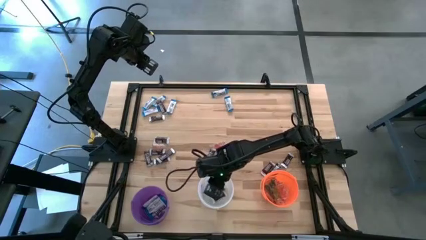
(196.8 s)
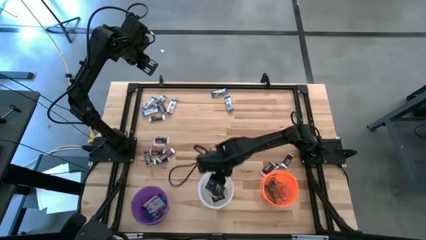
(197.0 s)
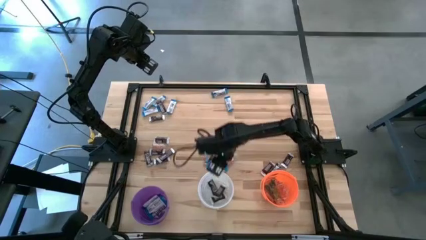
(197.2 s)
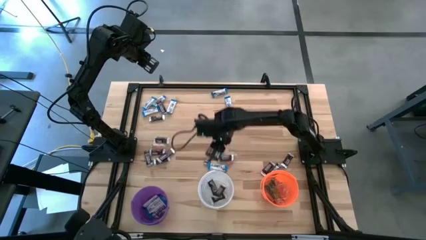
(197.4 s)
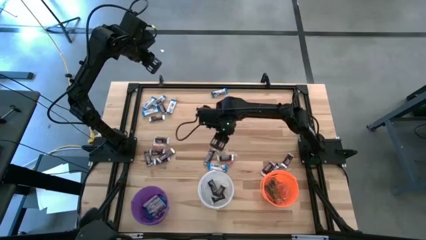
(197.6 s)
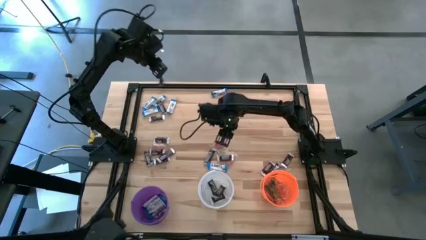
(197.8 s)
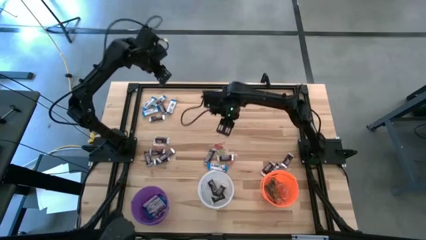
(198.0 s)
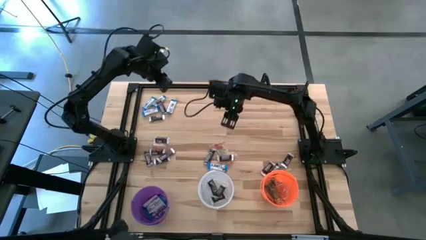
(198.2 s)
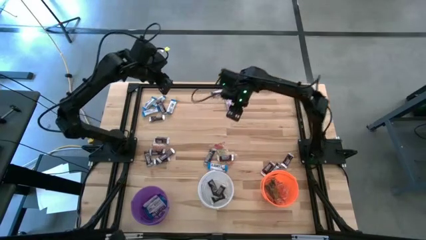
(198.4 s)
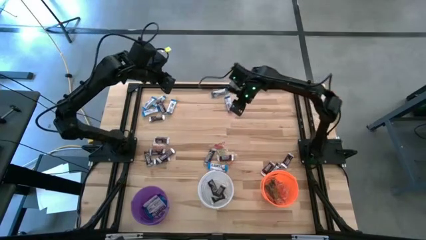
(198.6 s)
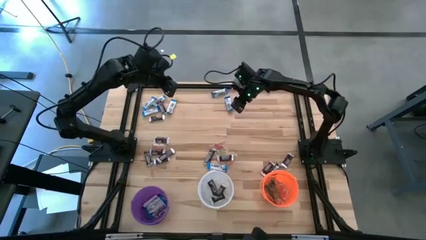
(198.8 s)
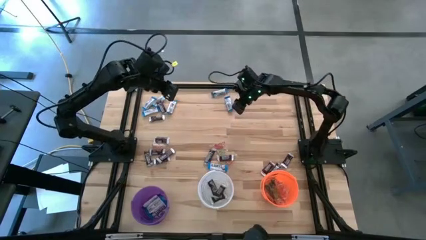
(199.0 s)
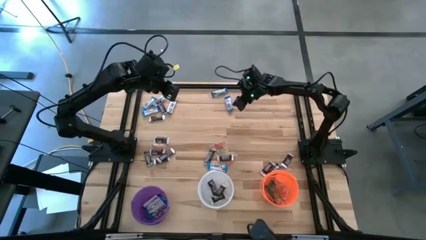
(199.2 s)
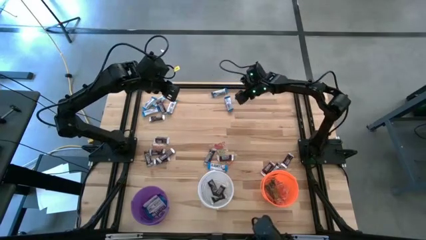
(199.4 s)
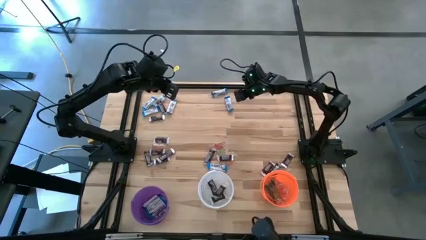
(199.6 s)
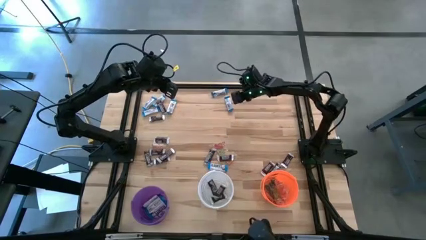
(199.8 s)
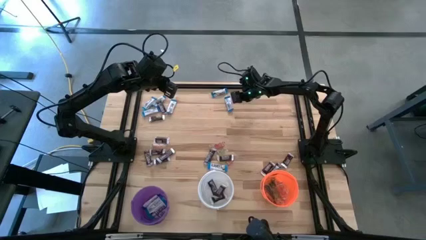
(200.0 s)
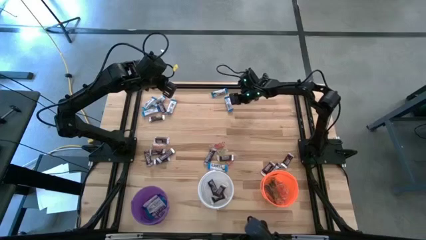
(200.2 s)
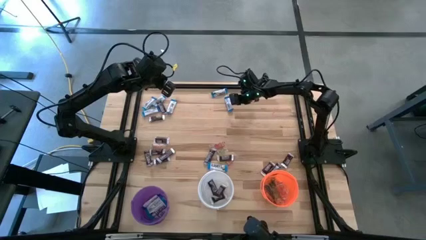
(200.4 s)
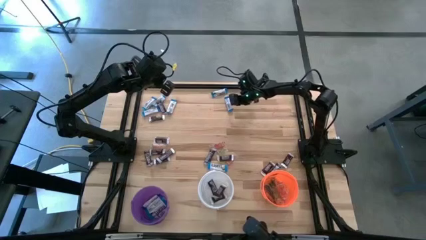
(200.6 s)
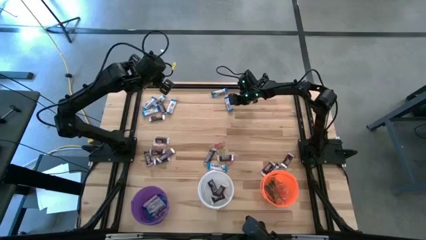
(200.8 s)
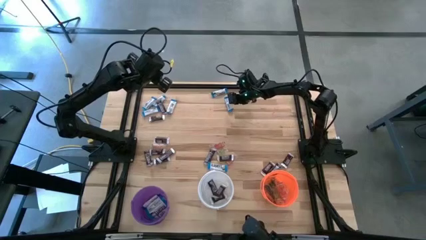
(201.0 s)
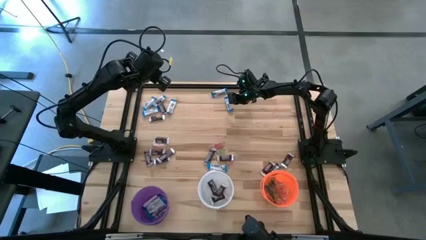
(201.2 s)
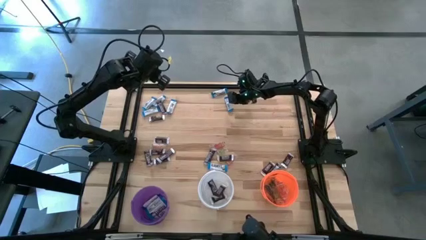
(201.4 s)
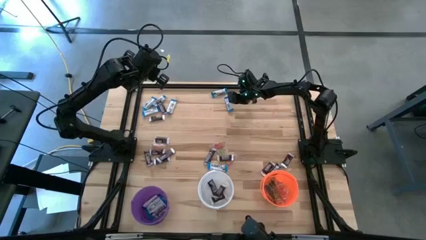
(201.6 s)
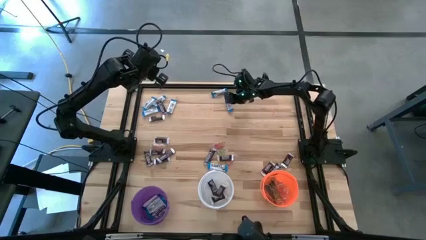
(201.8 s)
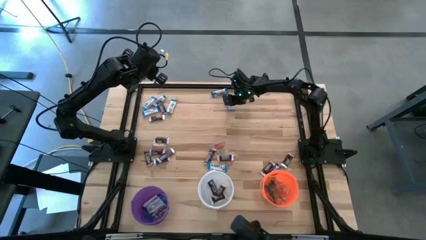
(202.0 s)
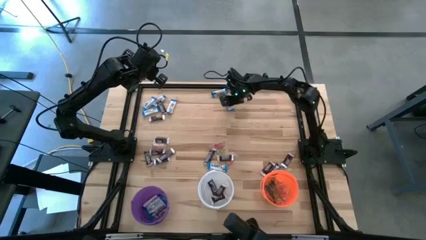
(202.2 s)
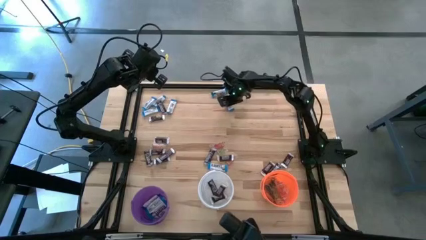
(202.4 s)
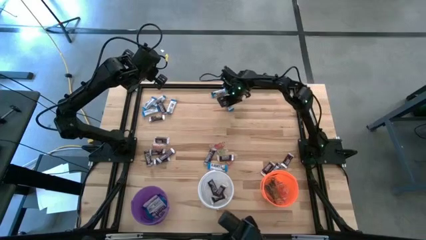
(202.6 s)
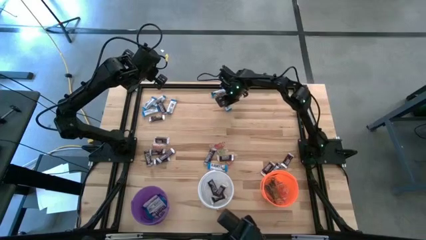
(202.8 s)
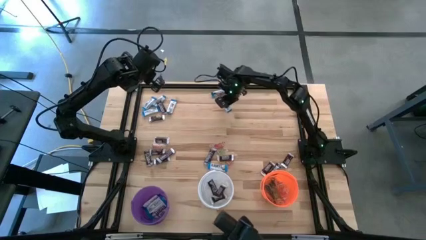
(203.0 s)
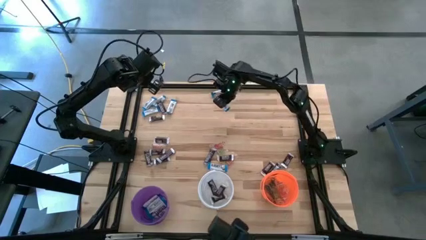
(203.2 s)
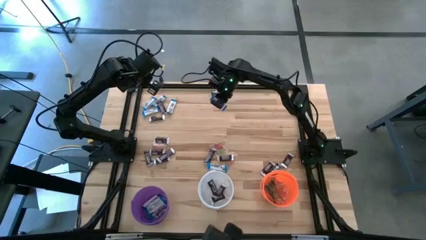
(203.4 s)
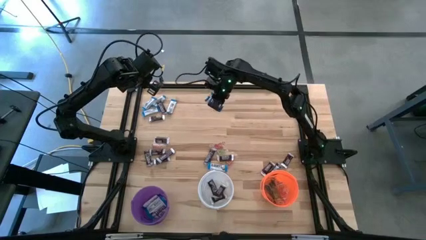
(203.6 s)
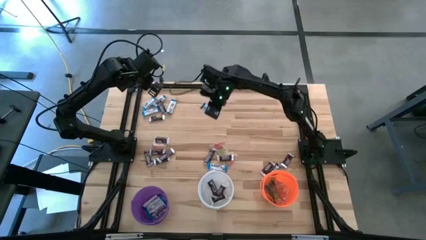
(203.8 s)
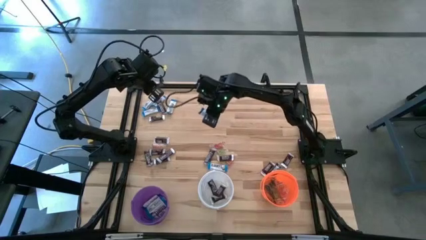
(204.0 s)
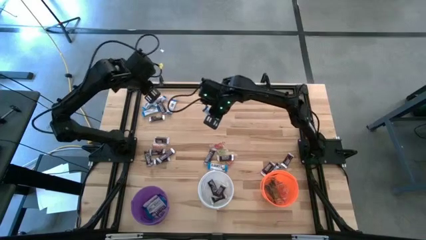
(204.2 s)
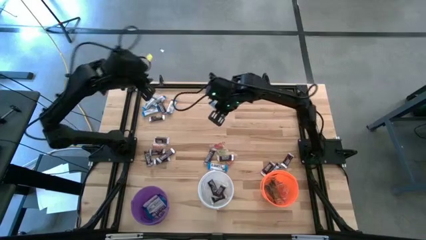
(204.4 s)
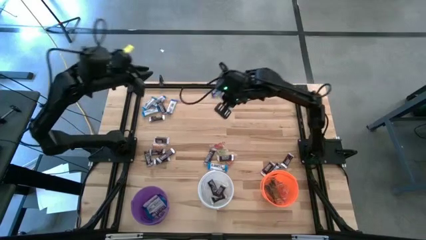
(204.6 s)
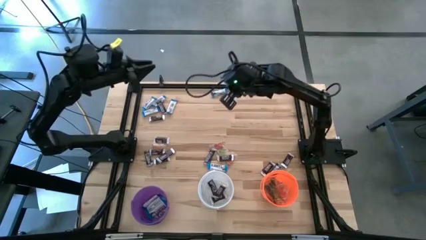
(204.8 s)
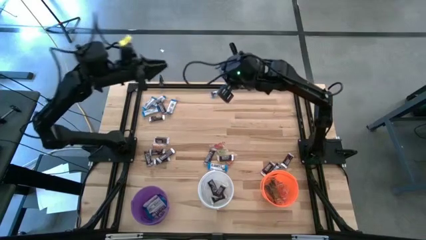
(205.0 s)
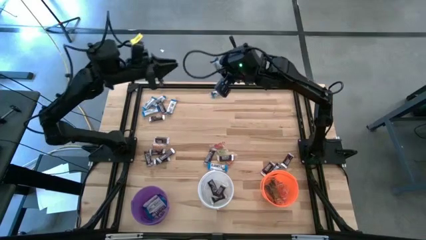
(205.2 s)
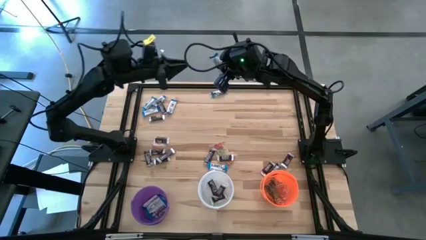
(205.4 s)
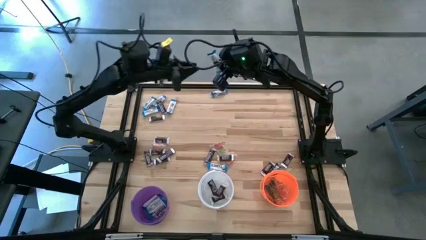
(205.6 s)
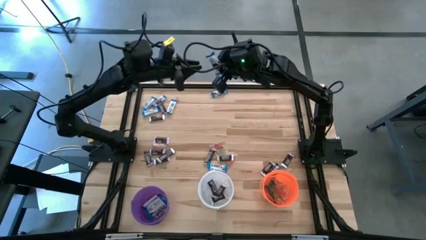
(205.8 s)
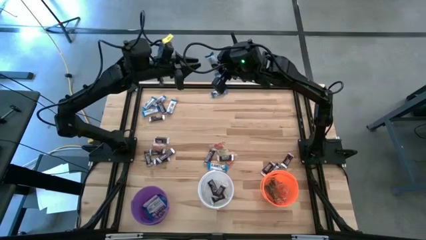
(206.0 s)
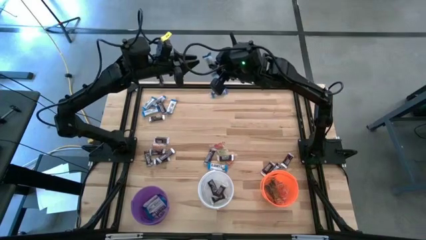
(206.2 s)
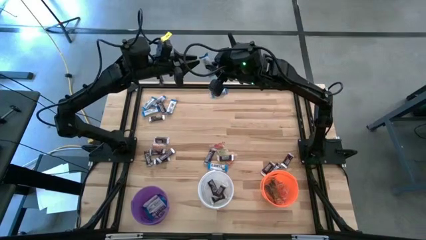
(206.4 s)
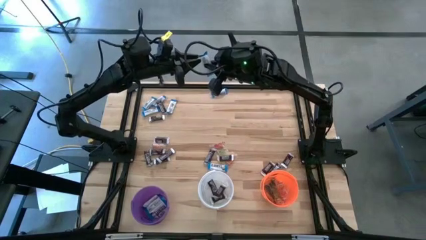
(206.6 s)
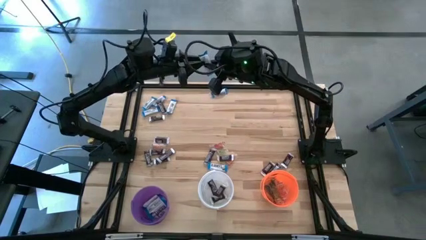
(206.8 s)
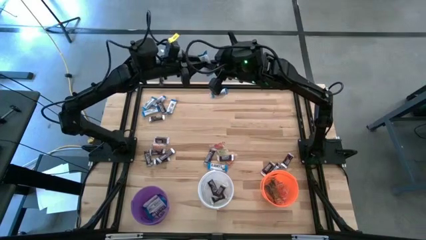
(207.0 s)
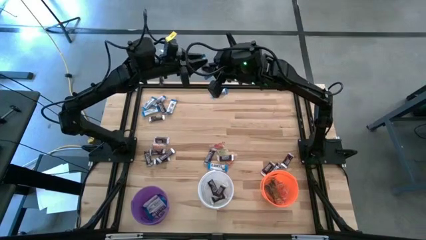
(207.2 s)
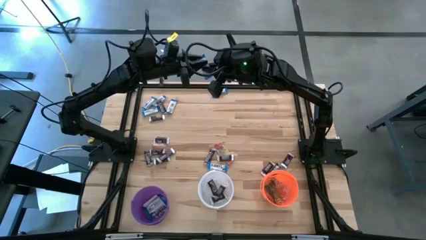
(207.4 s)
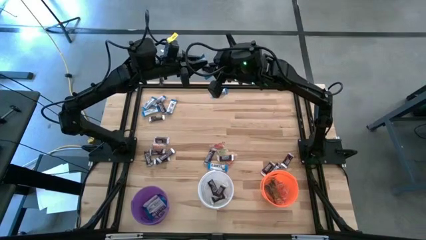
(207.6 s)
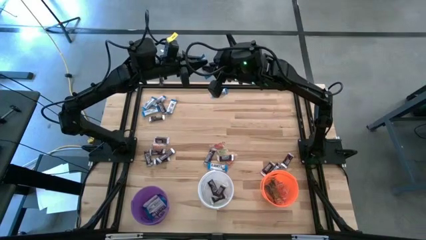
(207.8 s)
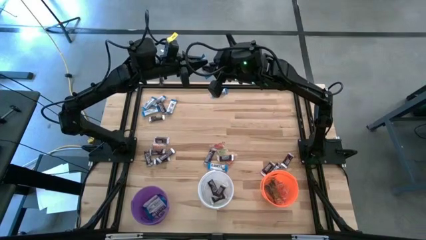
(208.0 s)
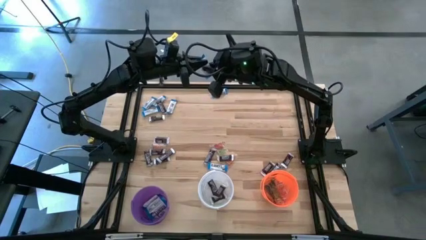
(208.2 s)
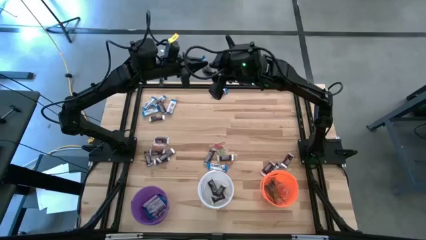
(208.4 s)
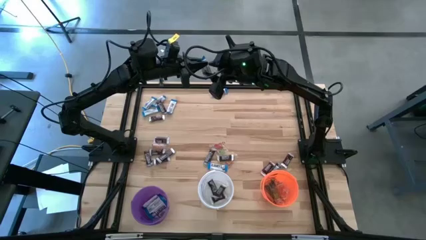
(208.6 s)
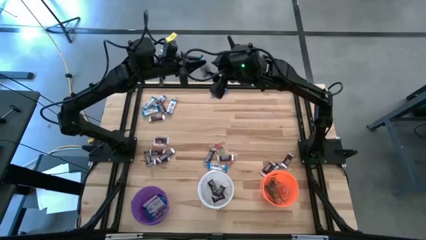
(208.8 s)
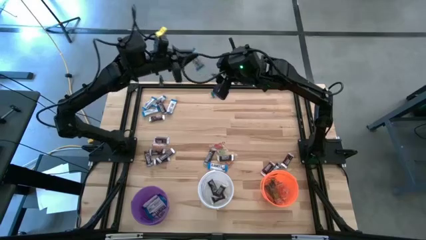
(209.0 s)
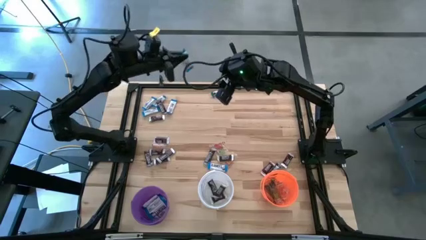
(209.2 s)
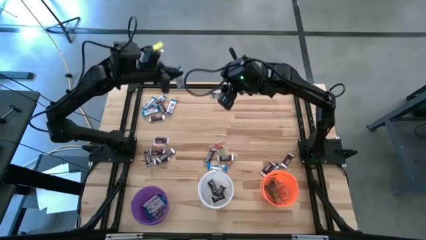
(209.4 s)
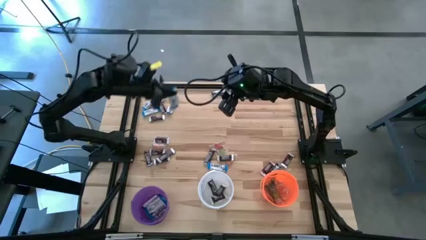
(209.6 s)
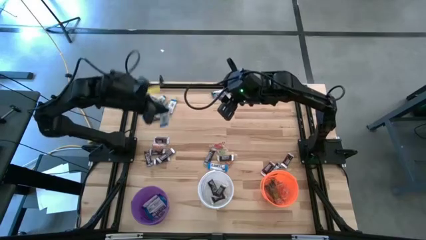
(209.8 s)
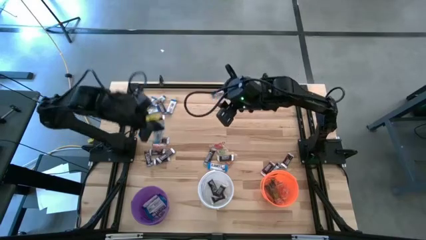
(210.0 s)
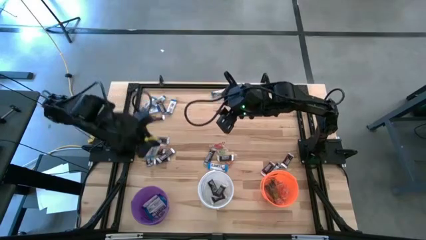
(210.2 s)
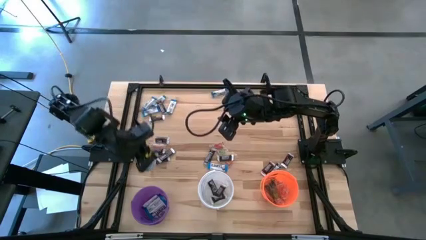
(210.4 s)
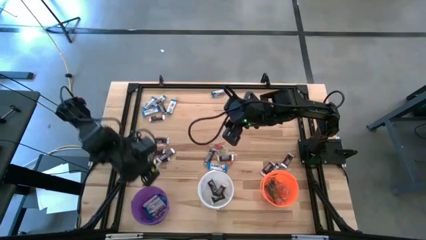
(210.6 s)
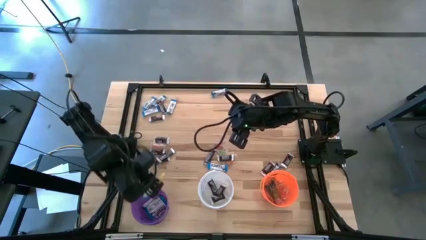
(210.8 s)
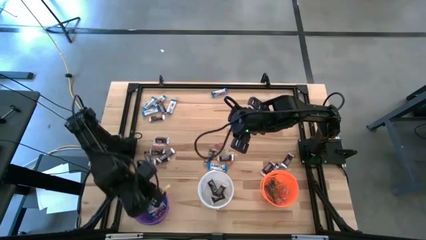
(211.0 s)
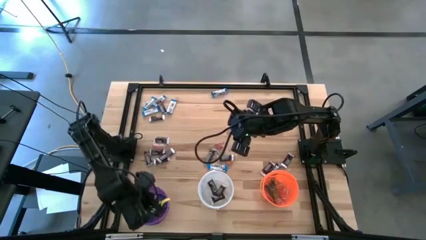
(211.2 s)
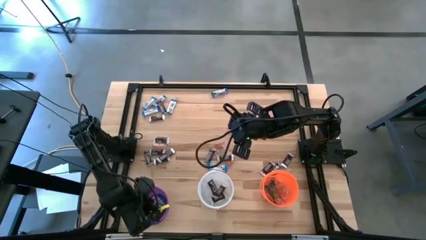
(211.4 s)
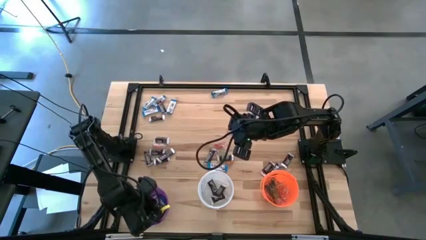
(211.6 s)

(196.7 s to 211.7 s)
Task: Sort candy
Put the white chocolate into the violet bucket

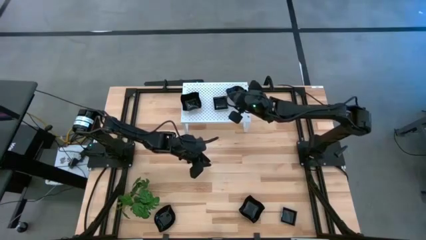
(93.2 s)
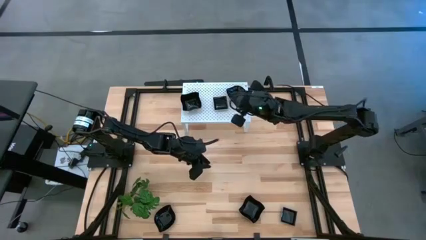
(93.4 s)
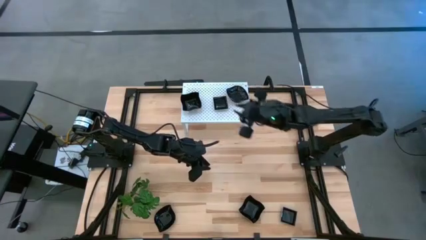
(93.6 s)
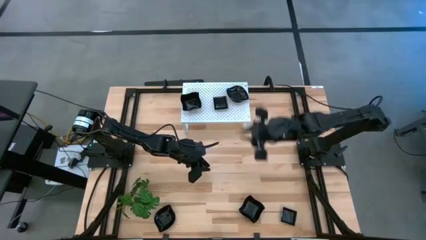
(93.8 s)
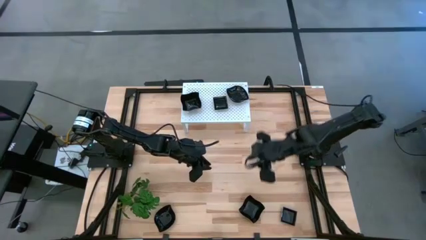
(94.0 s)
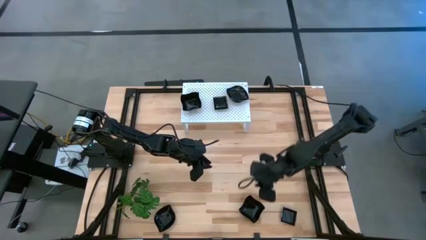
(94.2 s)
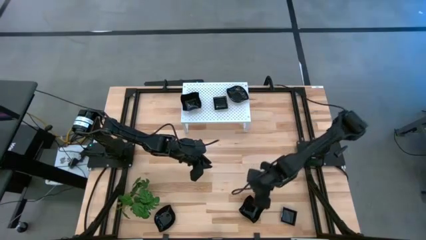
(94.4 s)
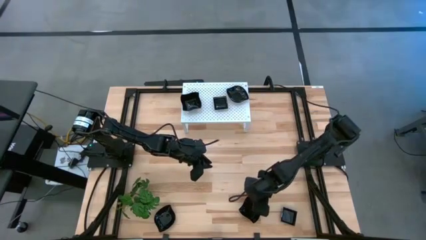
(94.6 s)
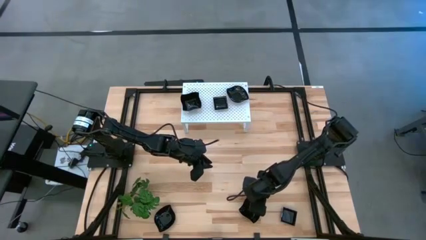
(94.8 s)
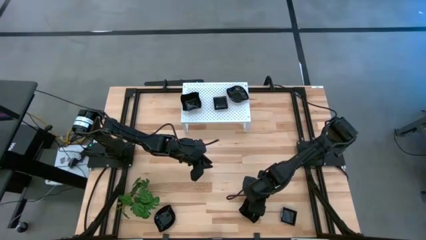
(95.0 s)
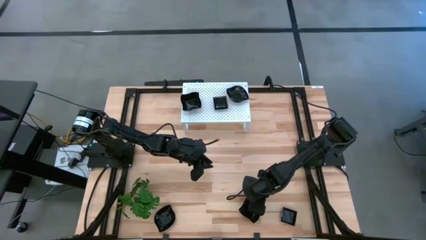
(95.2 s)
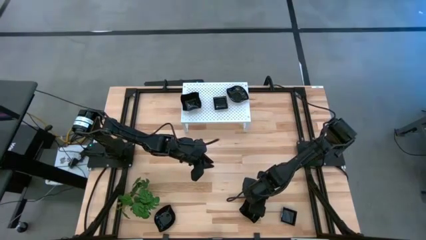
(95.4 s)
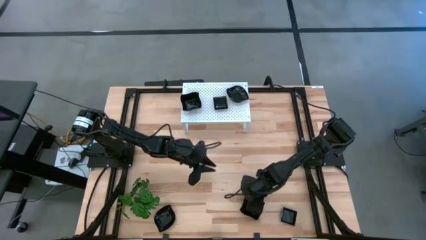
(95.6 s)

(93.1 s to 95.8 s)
Task: Pick & Place Mini shaped plates
Stack the distorted square plate on top of the other distorted square plates on the shelf
